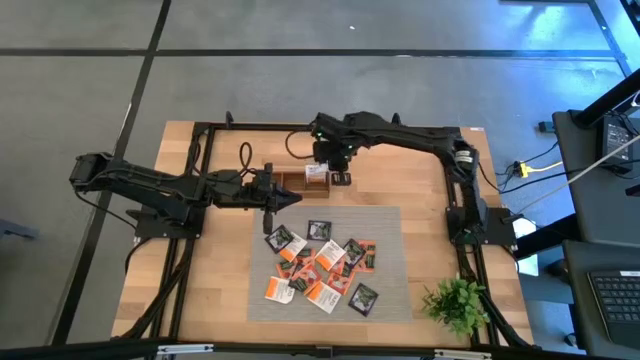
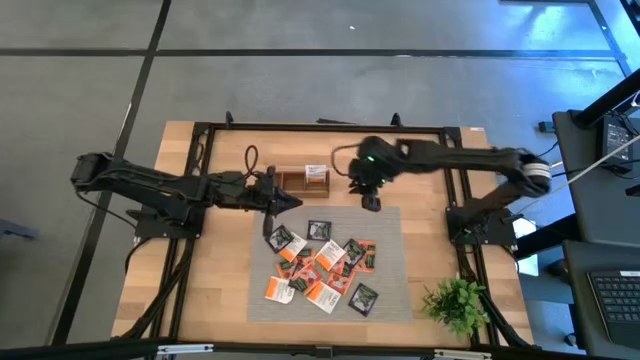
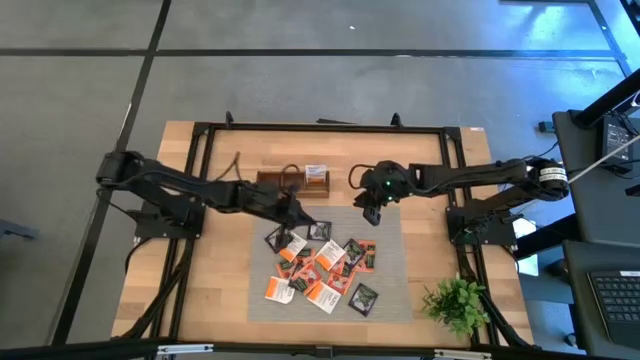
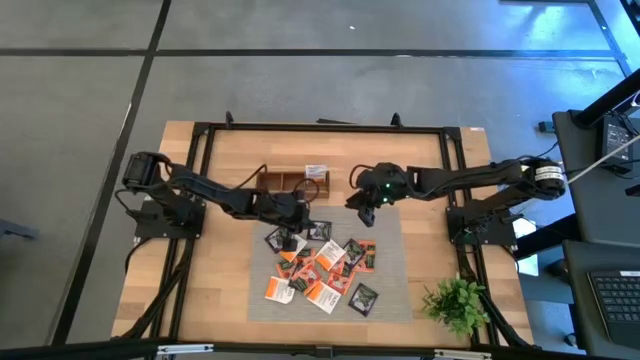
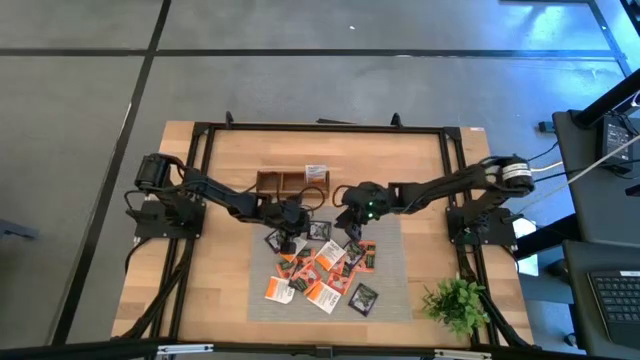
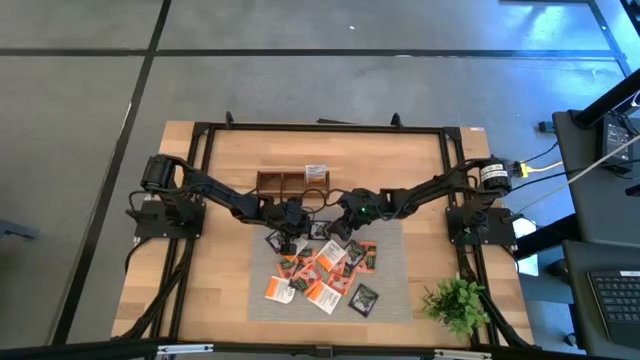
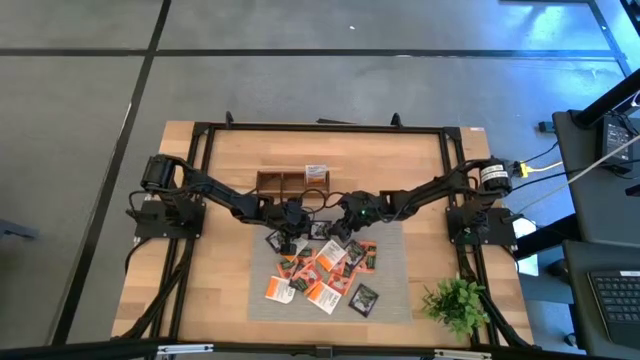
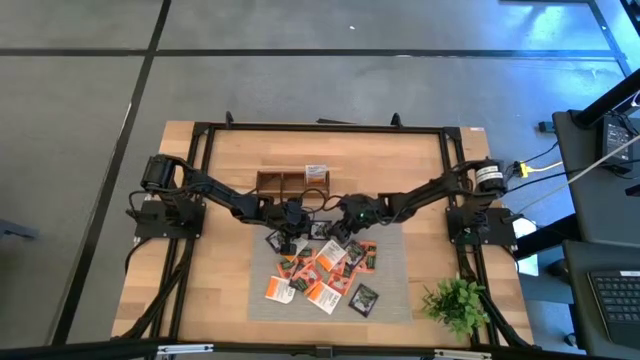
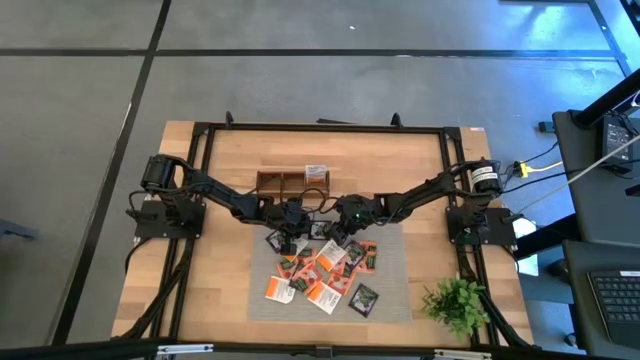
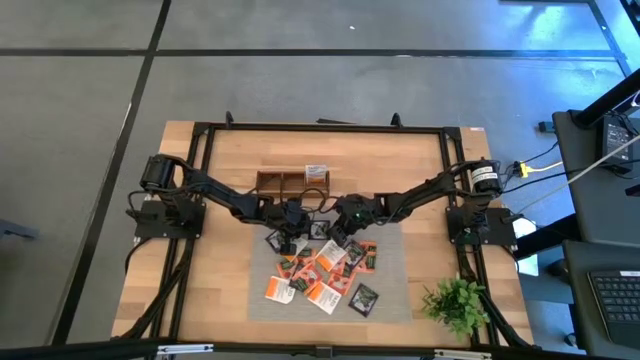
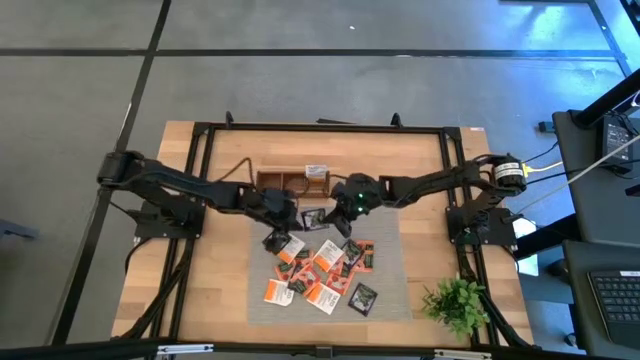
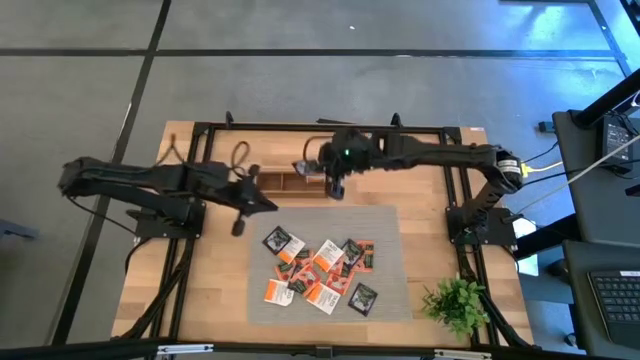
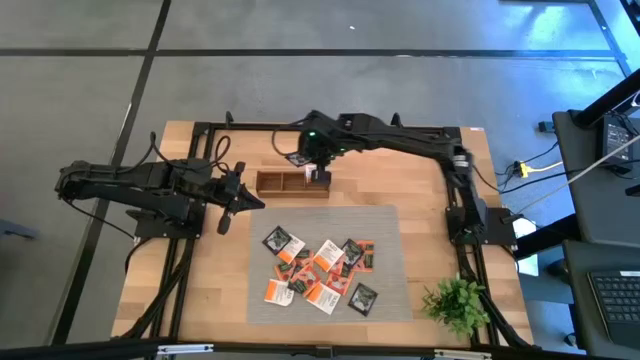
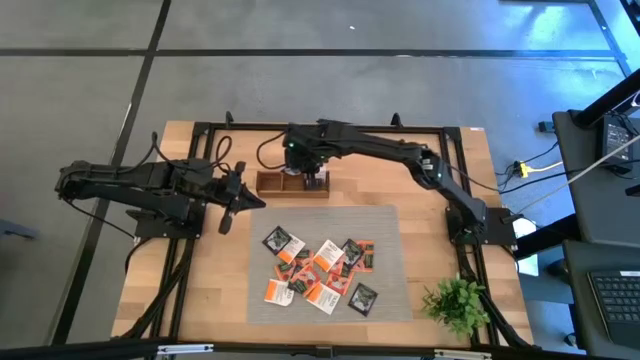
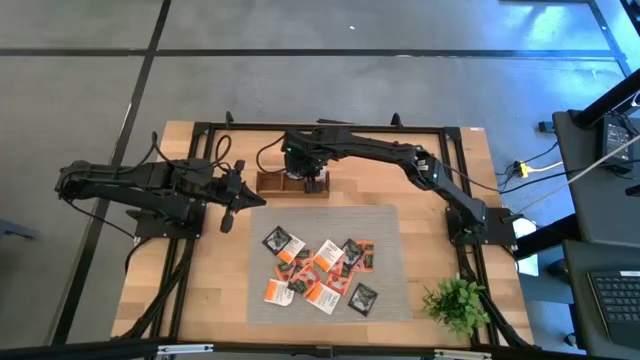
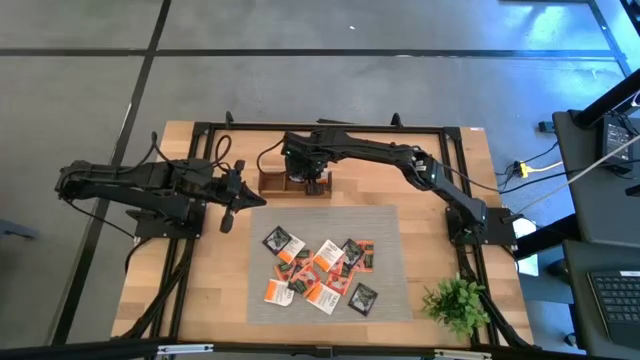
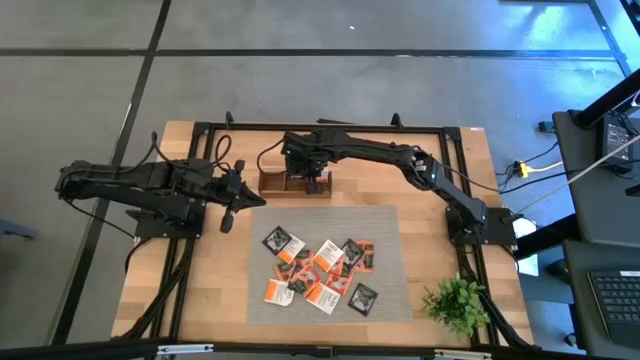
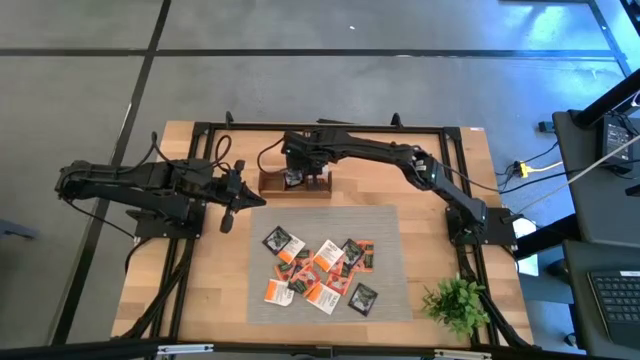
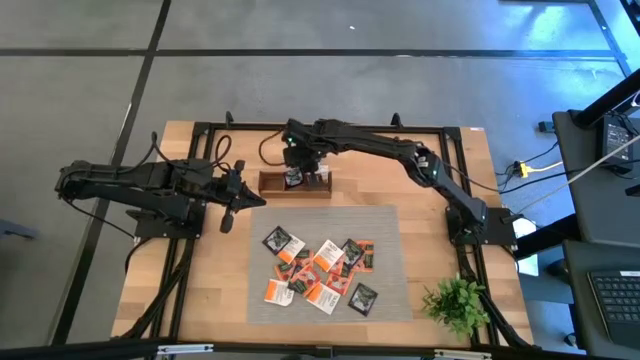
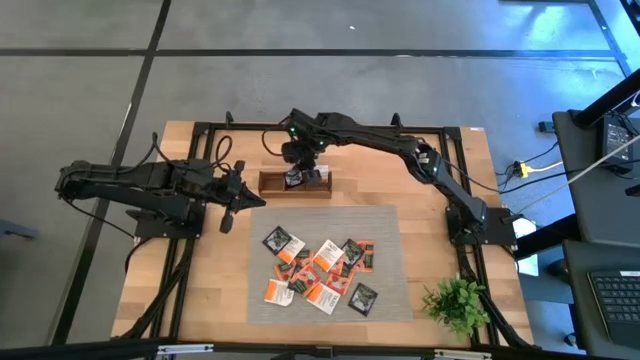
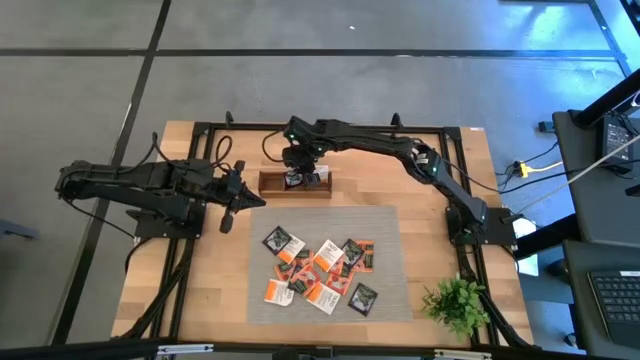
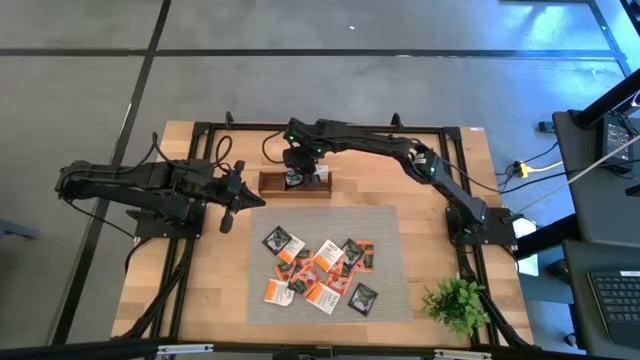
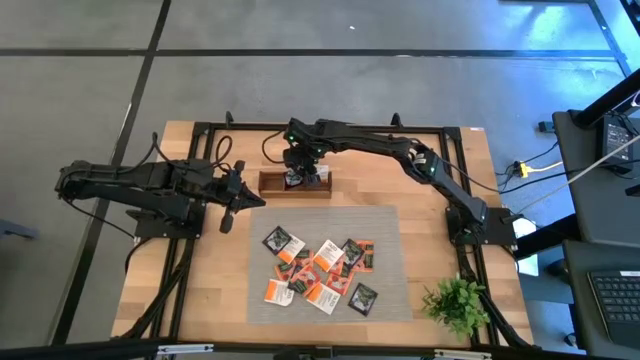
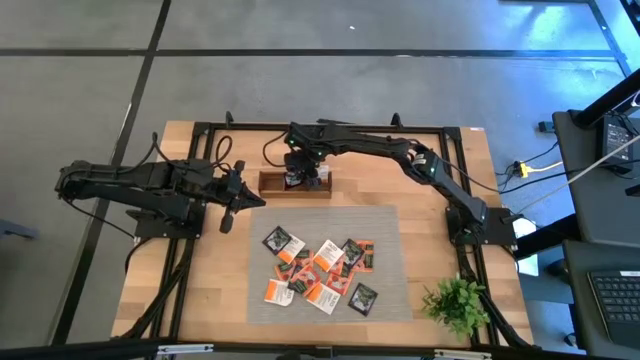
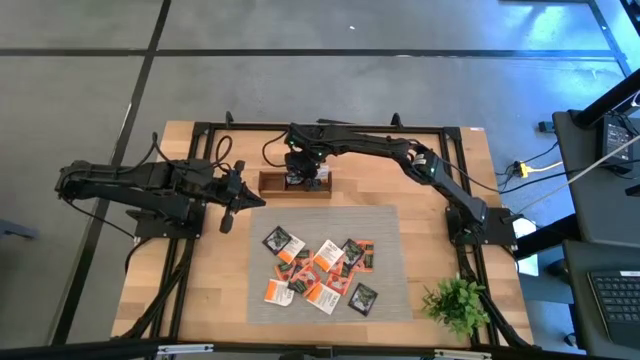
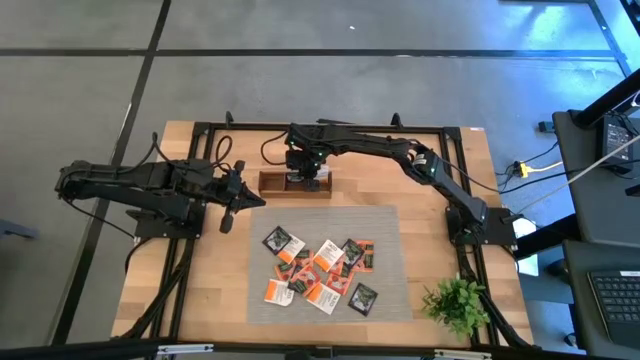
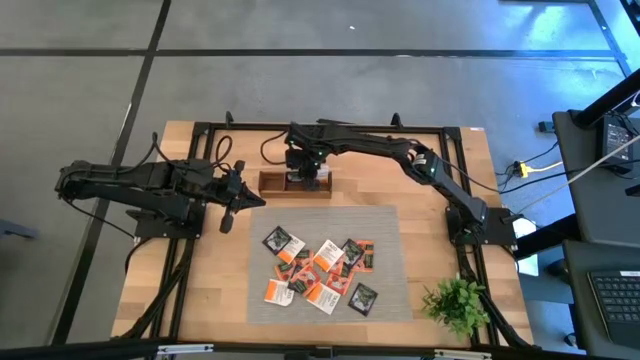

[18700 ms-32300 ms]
Task: Pick & Place Tea
Put the purple tea bag into the middle section of the wooden organizer

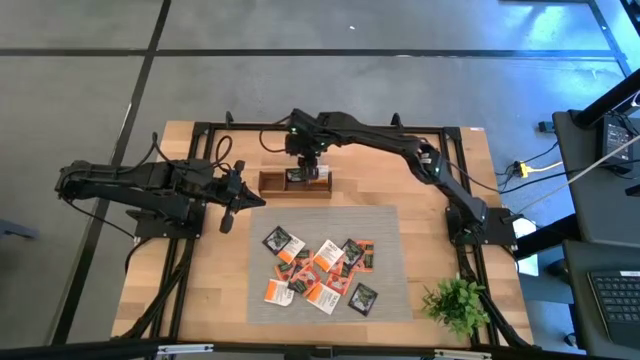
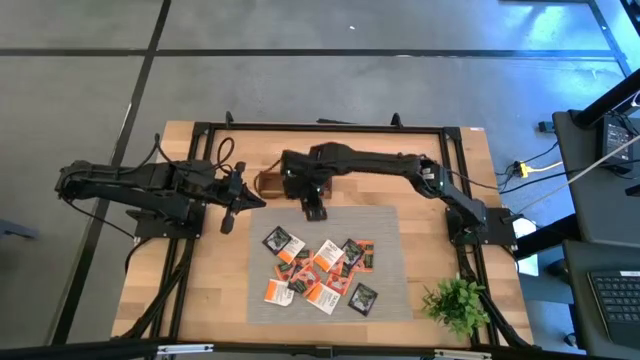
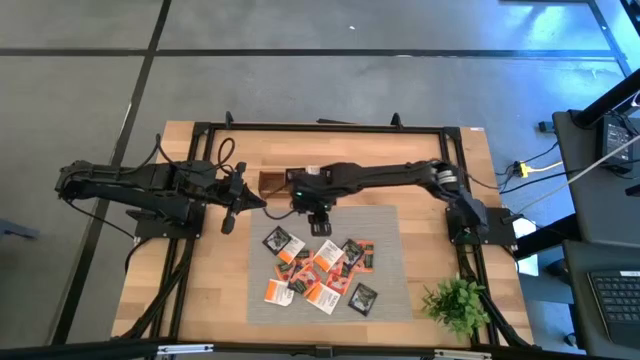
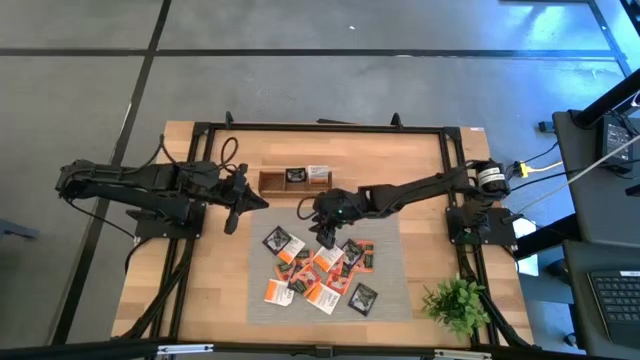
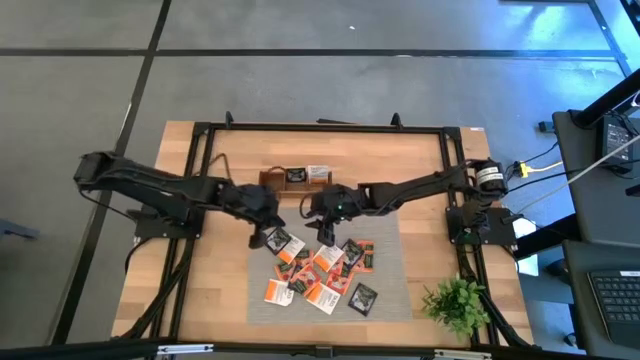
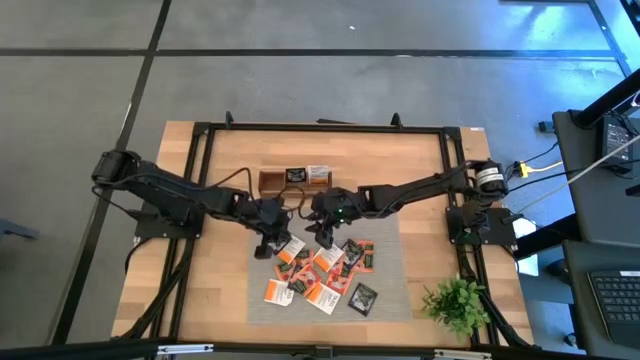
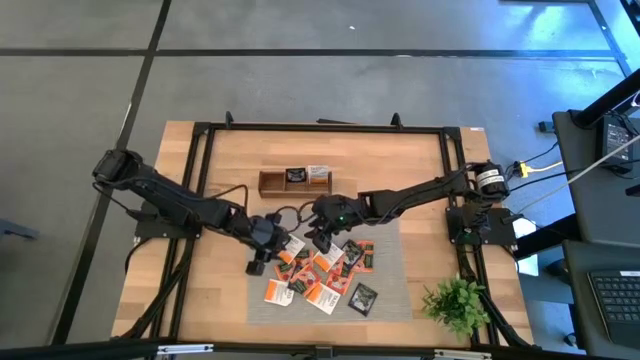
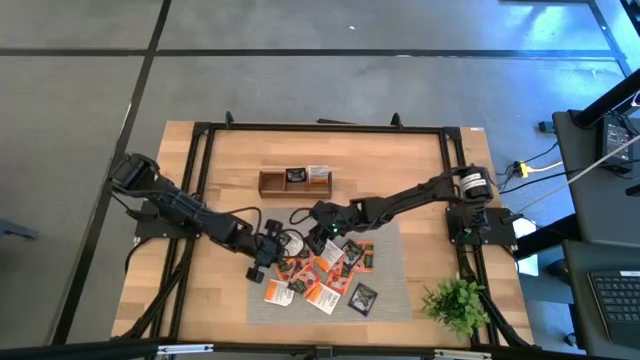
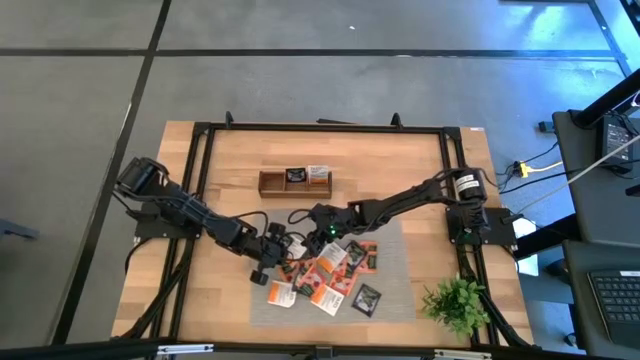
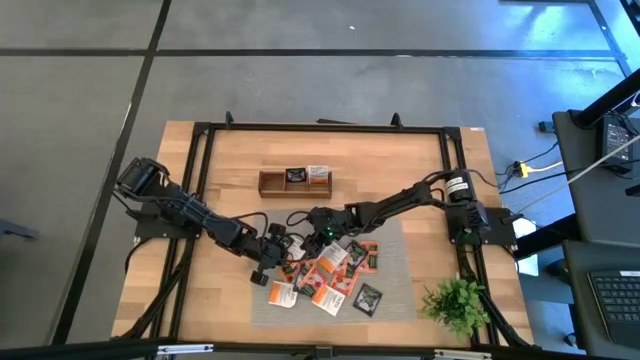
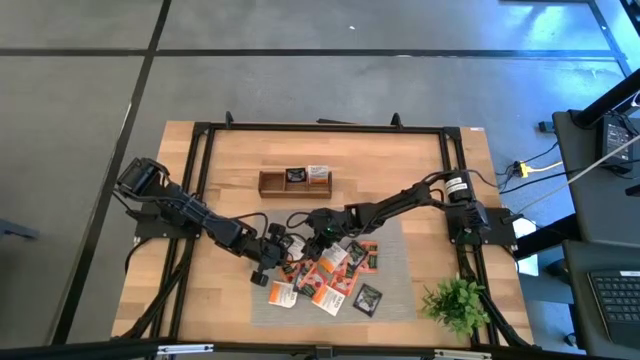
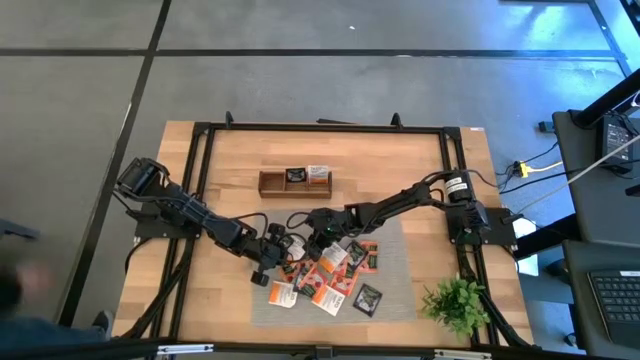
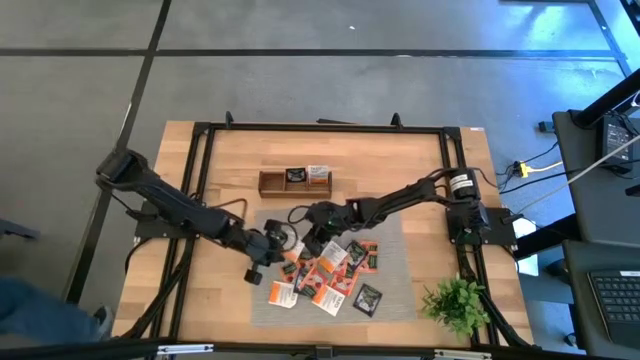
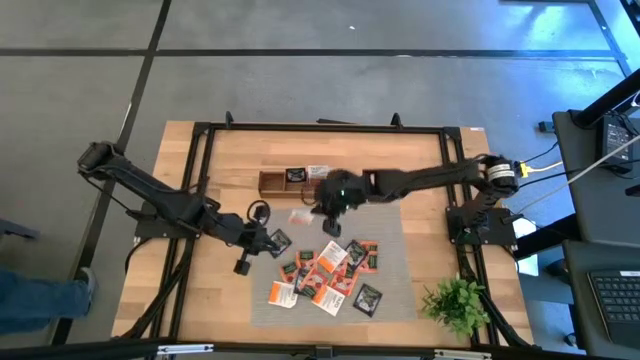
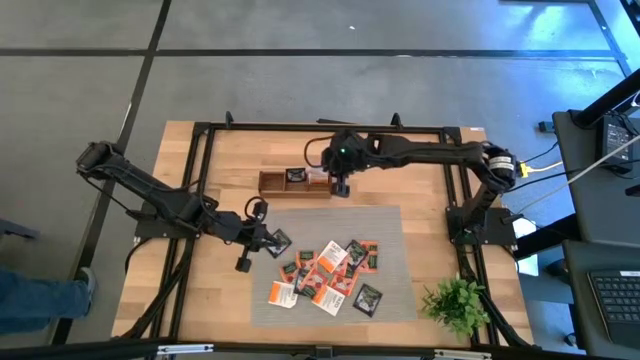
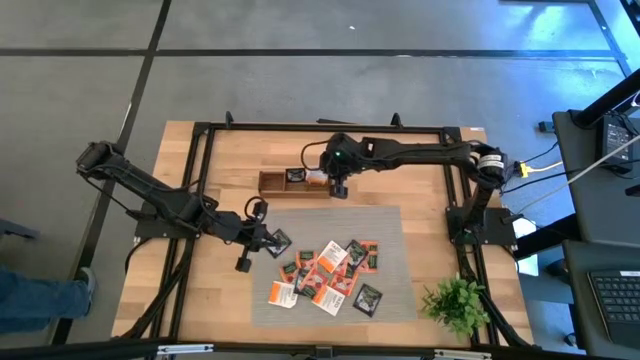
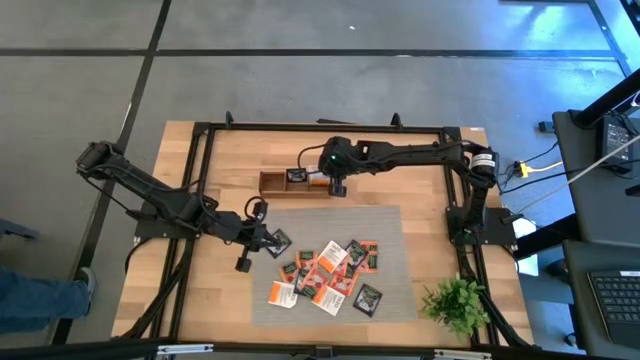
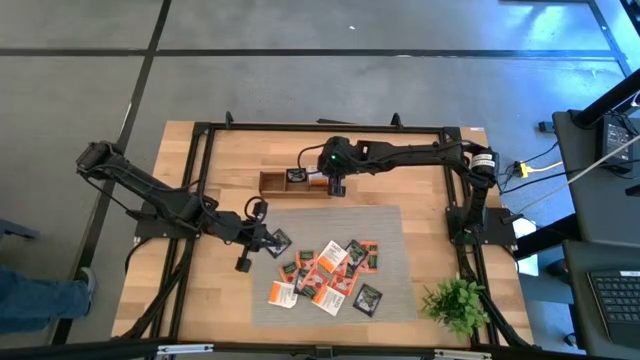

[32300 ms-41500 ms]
Put the white orange tea bag into the right section of the wooden organizer
